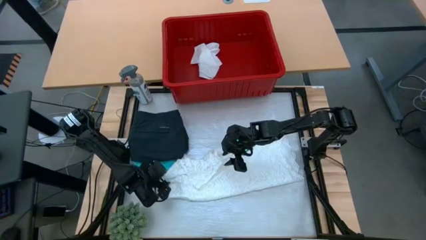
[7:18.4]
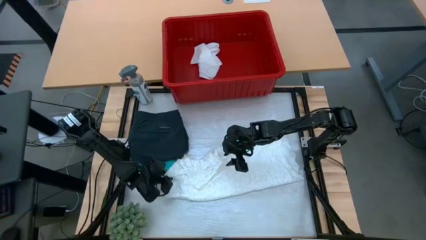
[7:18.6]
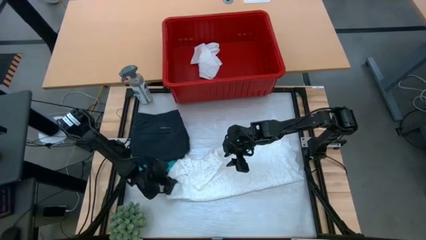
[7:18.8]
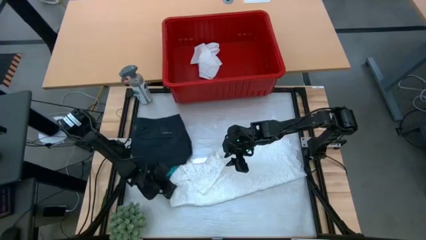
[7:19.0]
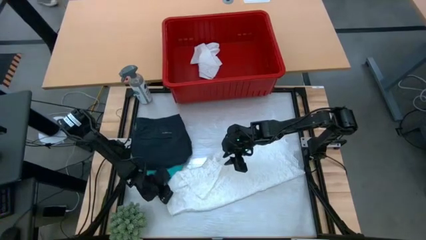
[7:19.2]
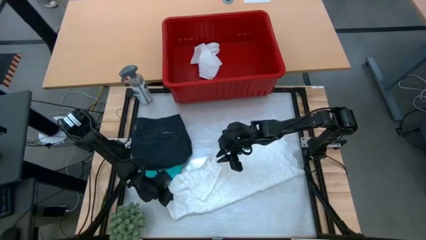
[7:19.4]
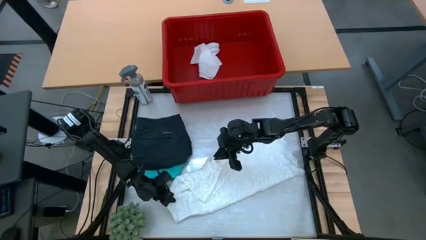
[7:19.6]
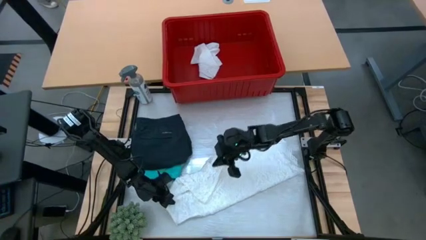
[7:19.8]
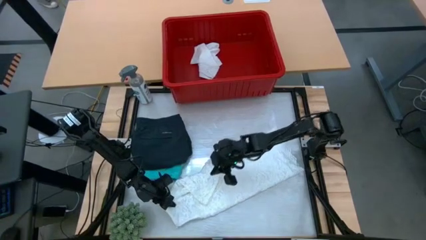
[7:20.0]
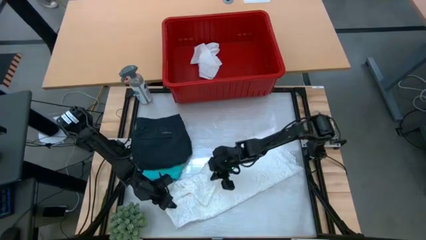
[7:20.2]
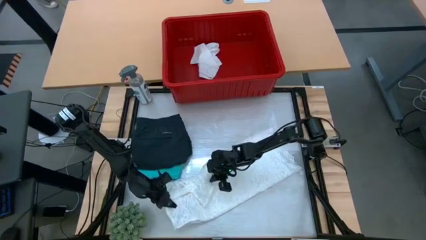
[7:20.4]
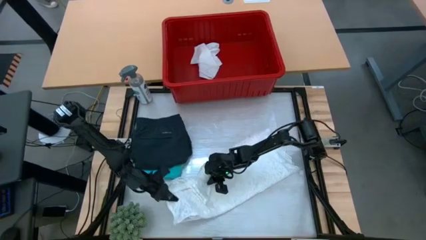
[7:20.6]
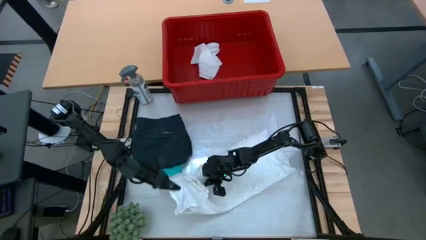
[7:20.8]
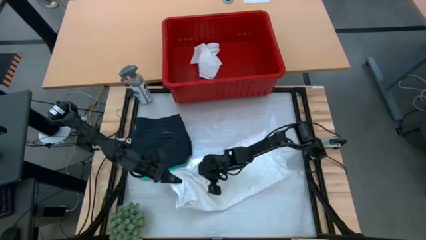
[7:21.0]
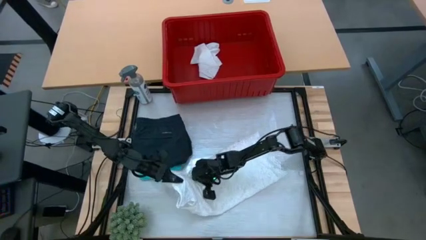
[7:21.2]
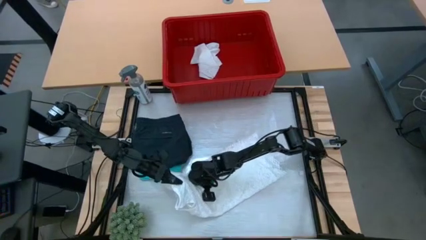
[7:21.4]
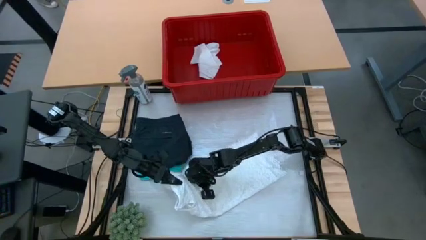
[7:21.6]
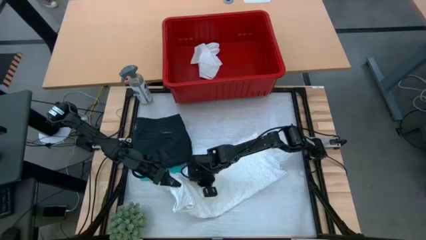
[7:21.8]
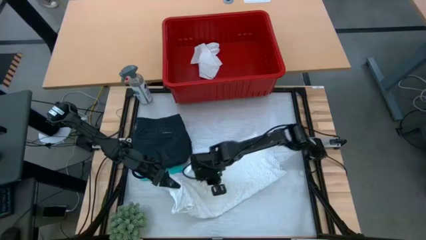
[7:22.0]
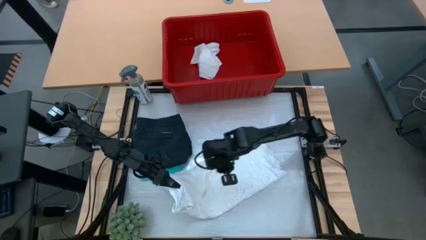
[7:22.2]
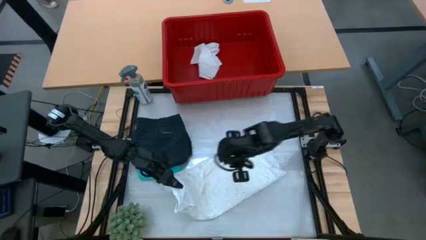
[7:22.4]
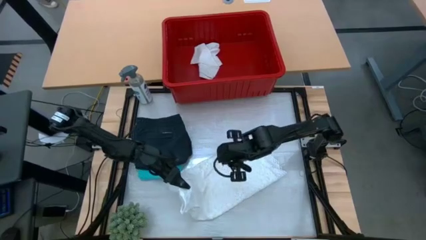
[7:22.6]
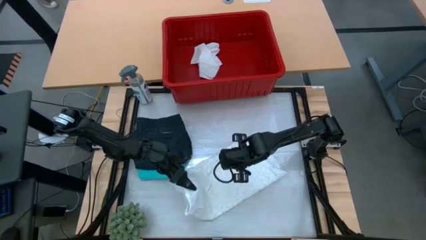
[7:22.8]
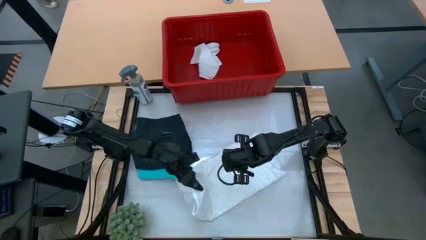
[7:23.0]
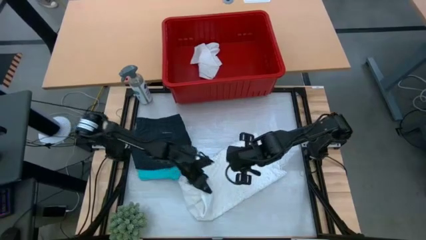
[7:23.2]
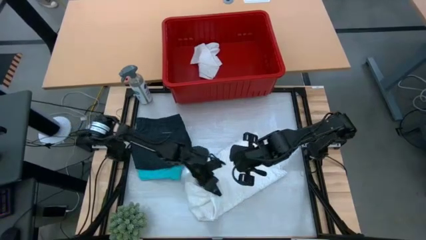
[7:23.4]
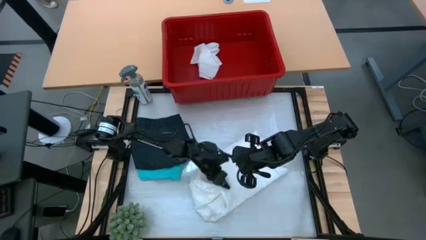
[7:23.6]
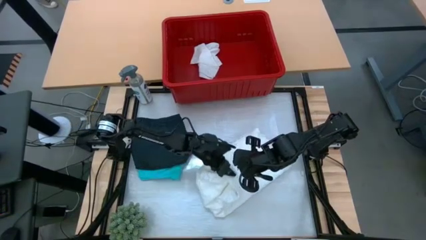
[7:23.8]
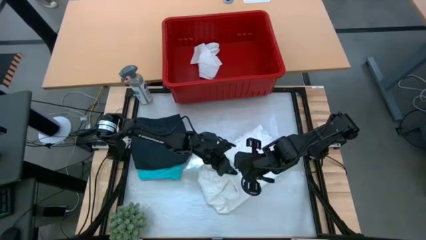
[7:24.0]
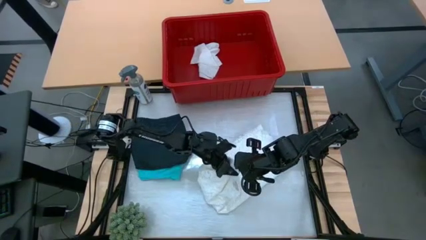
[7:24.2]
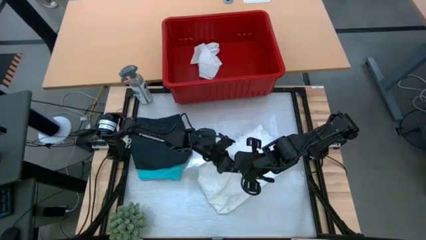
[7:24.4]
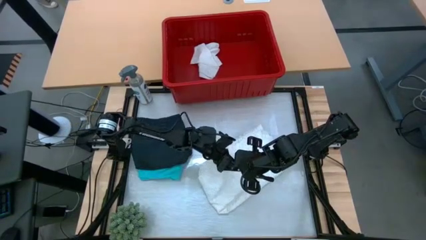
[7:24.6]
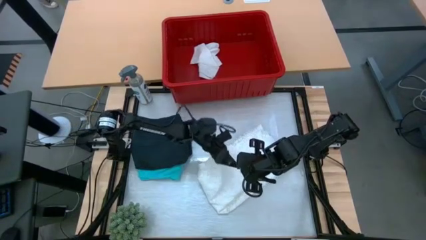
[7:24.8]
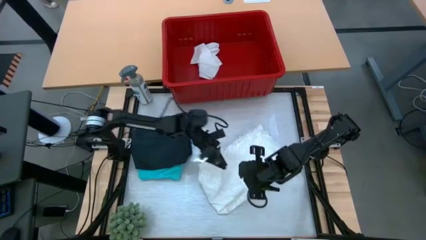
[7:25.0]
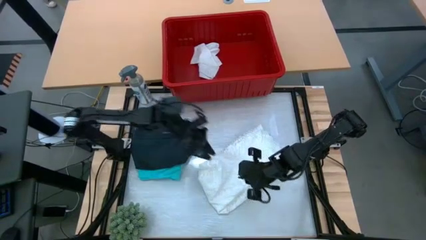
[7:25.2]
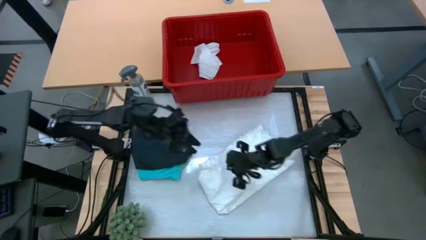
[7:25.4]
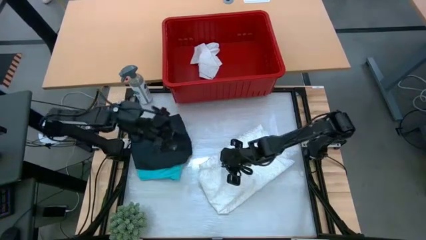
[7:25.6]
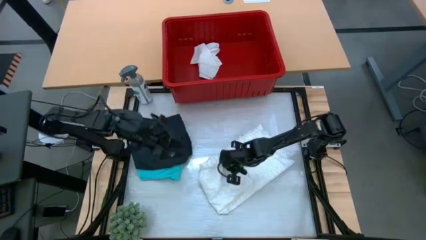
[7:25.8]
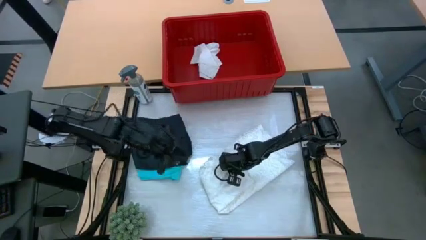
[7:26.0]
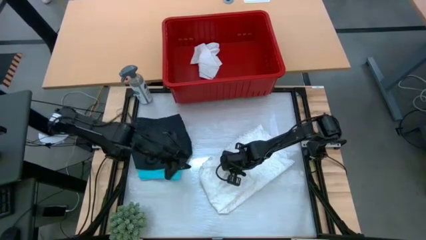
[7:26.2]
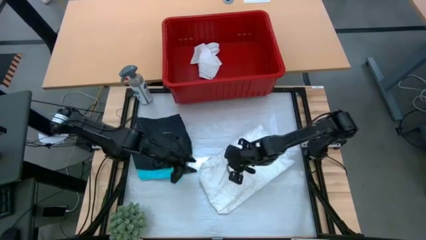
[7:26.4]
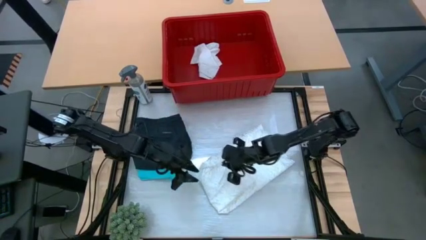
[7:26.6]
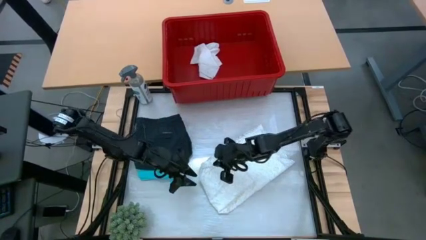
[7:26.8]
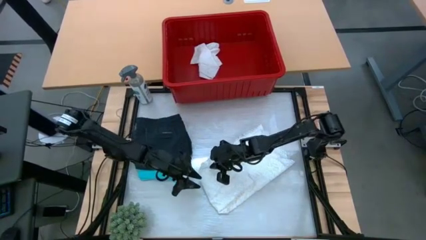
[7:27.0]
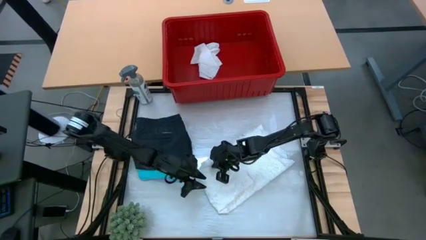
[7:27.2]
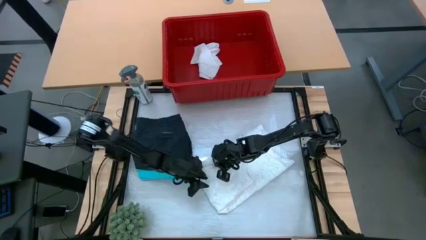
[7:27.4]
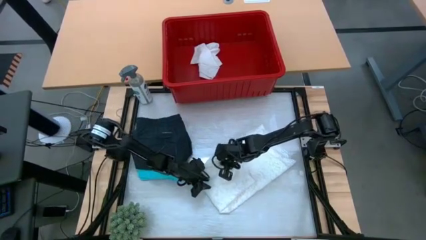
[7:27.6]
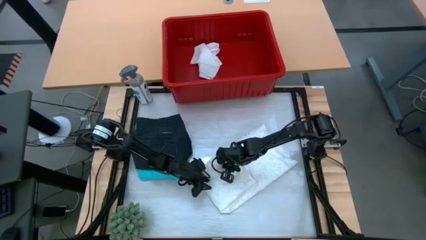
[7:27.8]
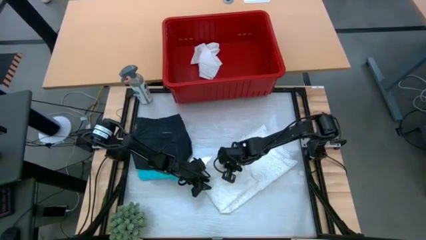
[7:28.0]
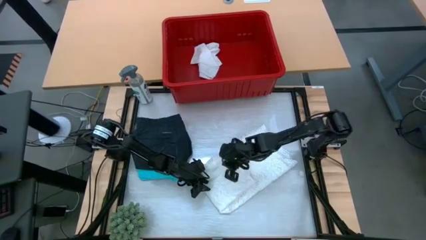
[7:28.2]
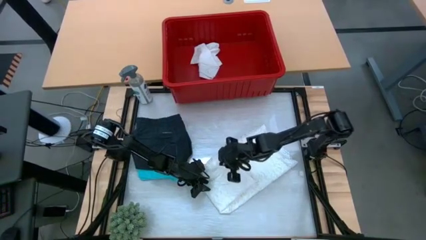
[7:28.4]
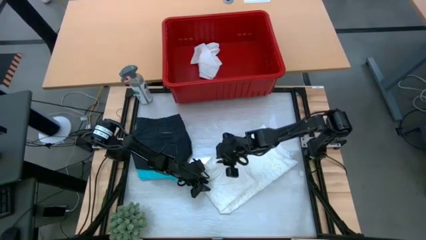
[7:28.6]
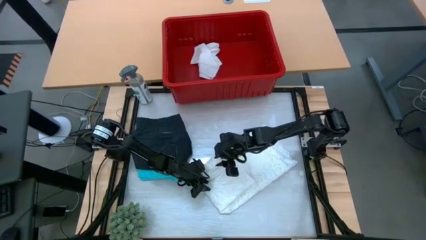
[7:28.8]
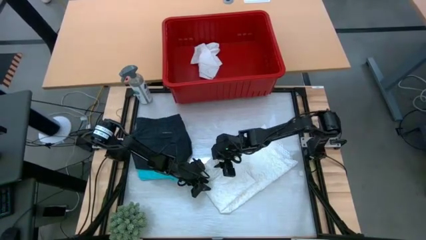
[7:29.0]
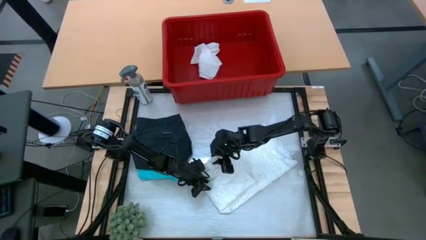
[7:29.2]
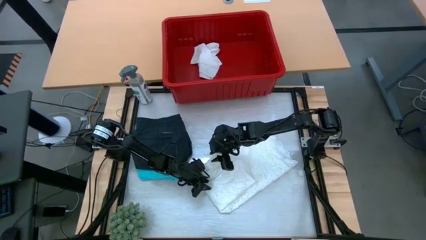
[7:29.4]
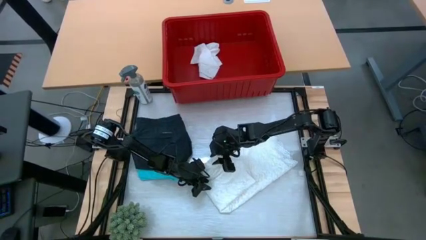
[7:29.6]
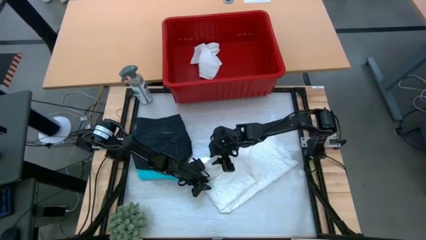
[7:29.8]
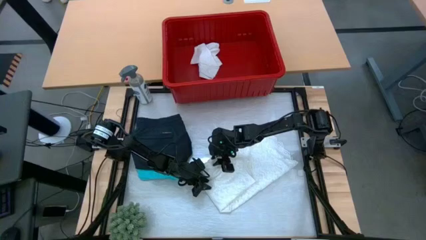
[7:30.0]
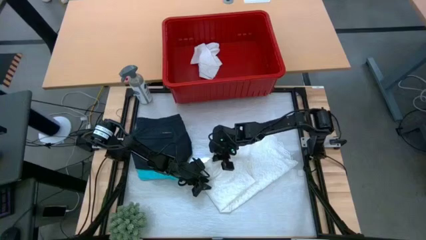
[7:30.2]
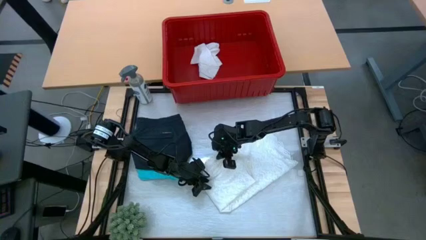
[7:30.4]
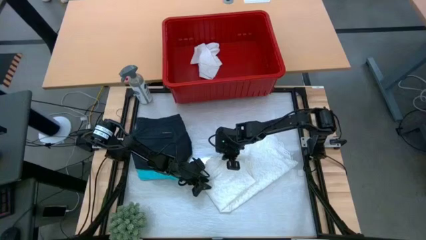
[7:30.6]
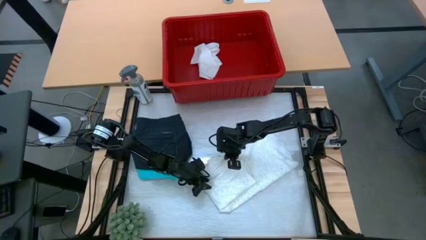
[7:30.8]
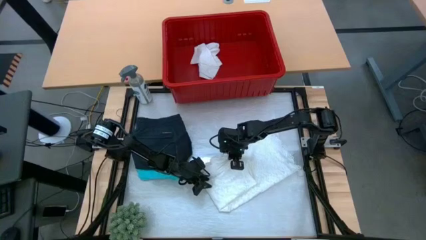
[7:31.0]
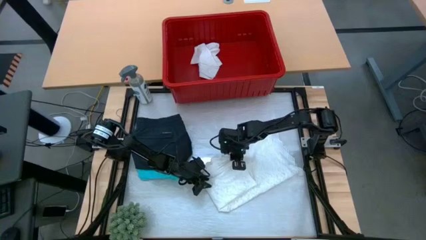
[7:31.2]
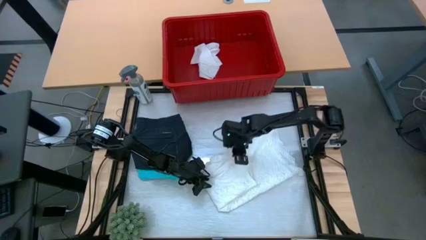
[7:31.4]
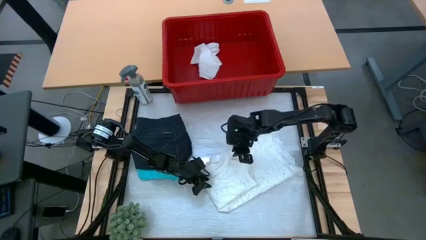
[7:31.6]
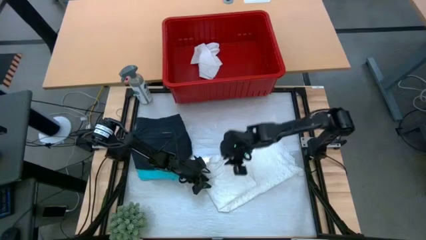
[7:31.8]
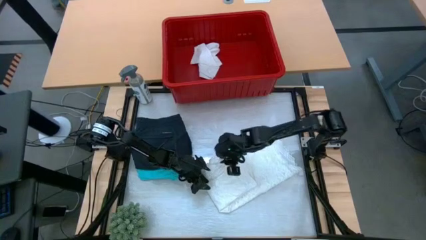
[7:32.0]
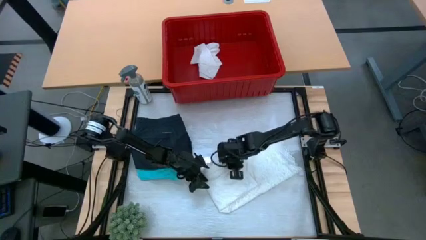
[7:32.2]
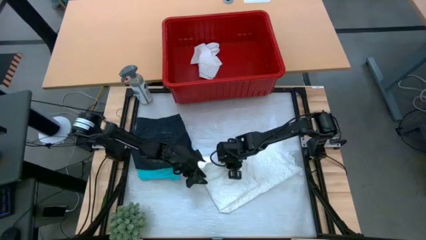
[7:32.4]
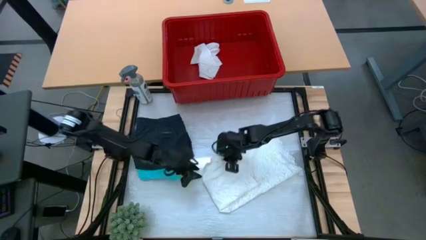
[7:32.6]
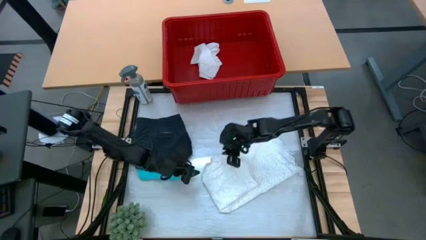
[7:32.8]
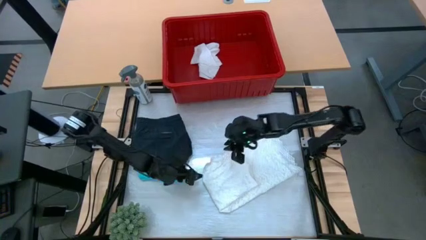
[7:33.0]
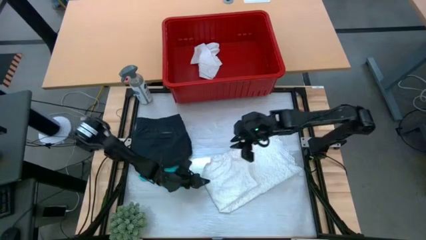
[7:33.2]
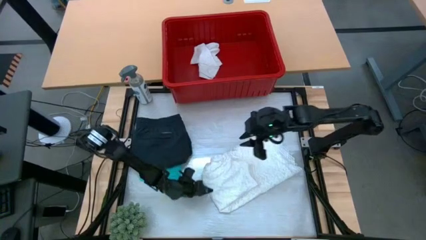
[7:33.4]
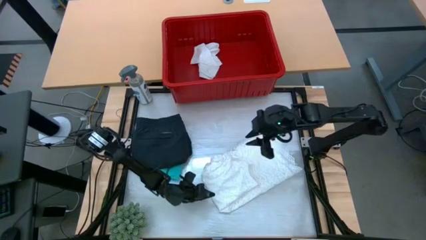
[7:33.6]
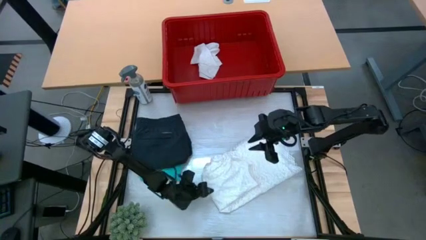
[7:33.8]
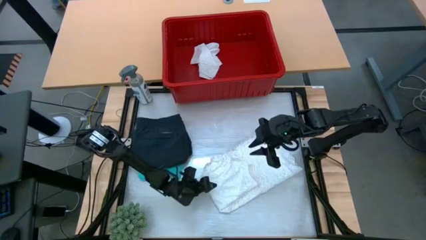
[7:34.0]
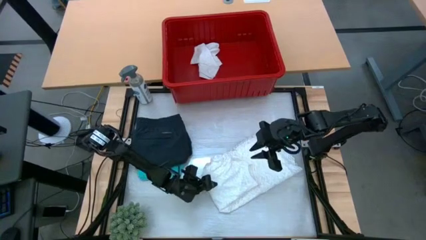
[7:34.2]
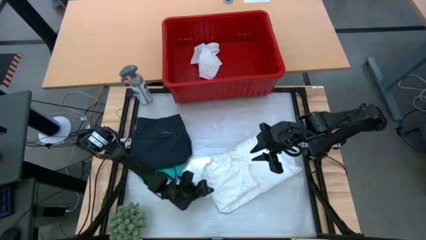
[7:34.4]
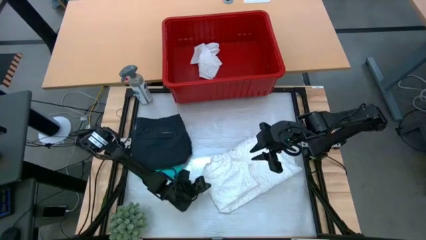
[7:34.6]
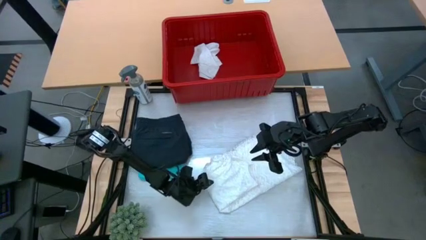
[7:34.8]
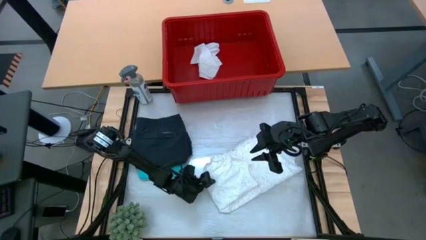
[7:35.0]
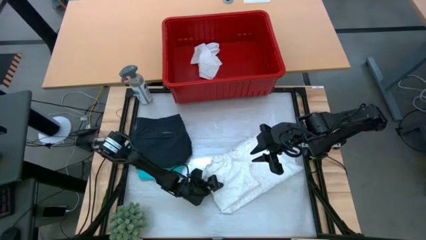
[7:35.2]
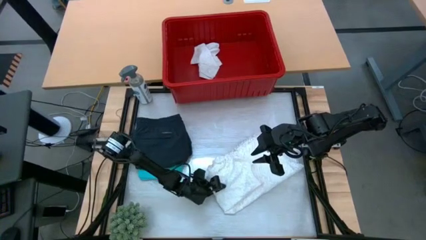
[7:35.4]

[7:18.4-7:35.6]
Task: Fold laundry
Fold the white dress
